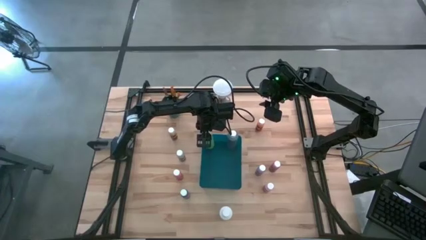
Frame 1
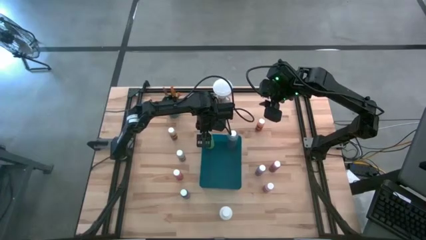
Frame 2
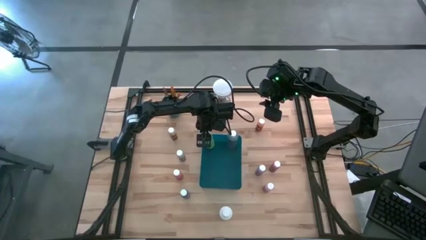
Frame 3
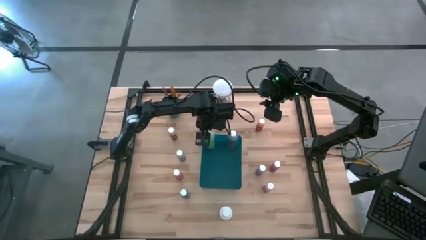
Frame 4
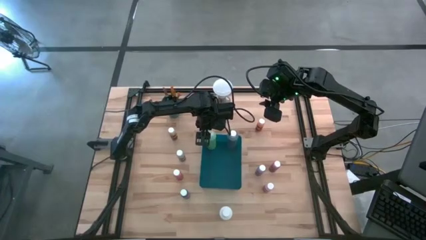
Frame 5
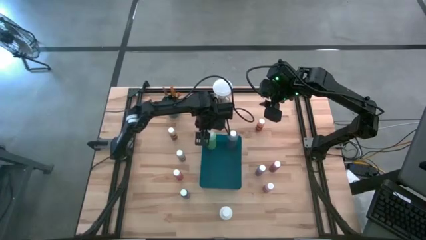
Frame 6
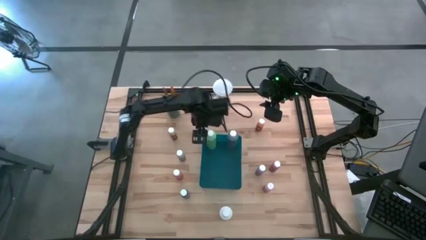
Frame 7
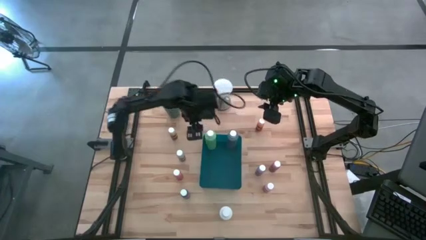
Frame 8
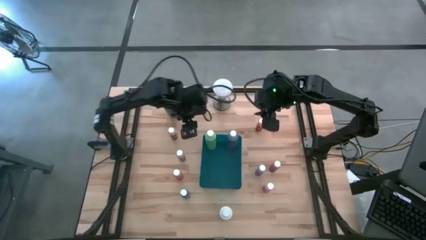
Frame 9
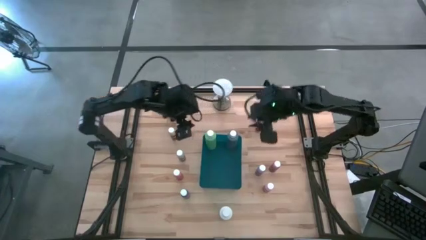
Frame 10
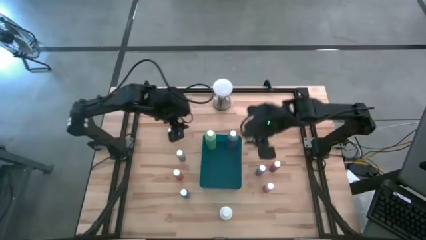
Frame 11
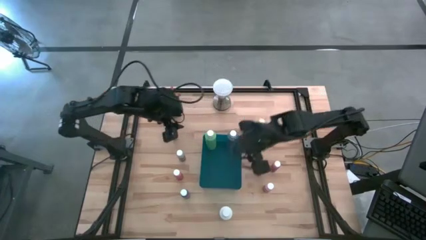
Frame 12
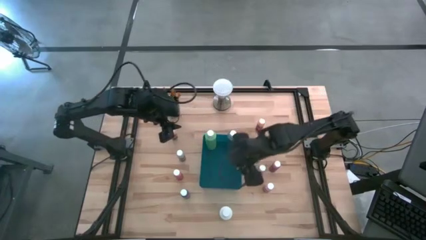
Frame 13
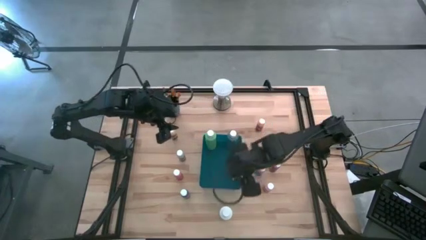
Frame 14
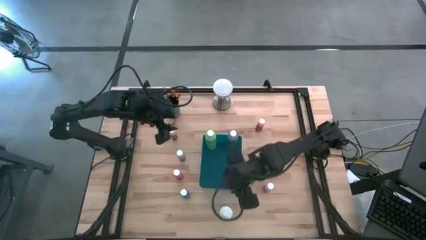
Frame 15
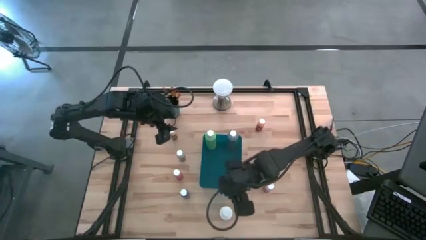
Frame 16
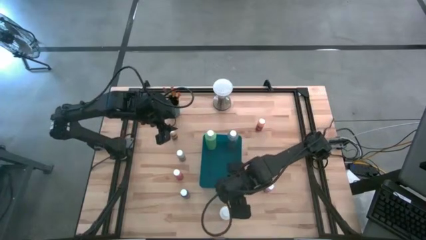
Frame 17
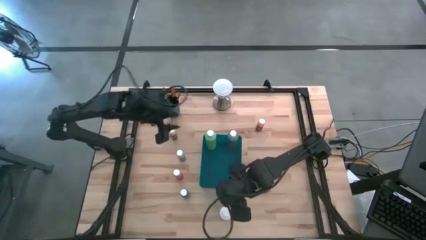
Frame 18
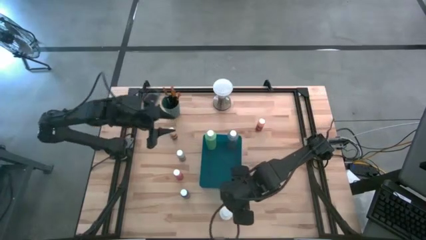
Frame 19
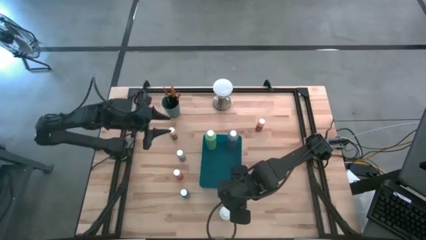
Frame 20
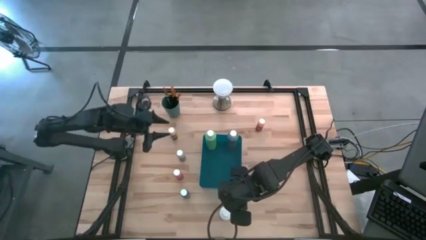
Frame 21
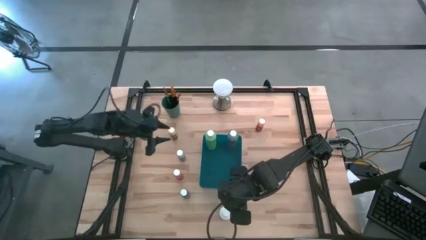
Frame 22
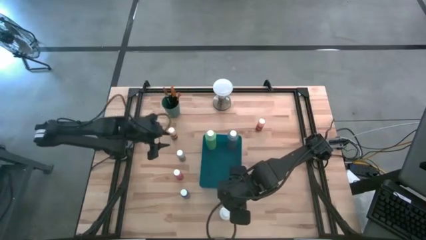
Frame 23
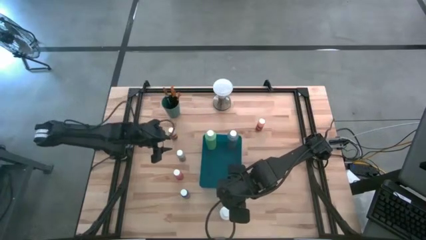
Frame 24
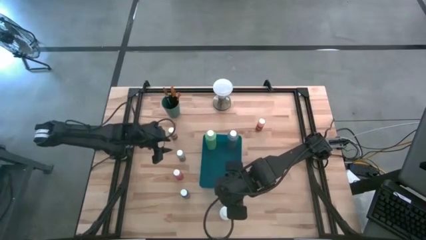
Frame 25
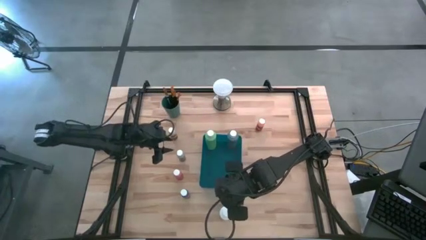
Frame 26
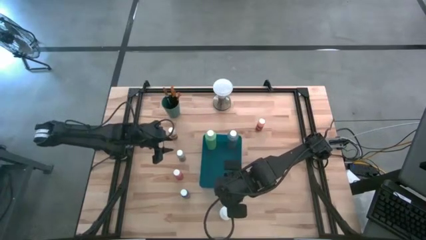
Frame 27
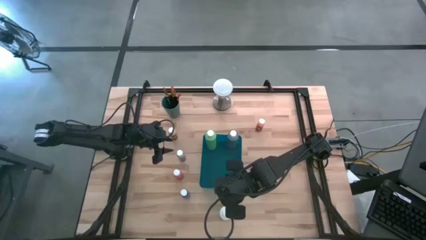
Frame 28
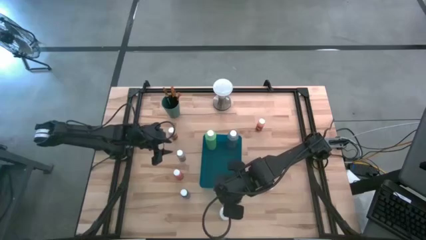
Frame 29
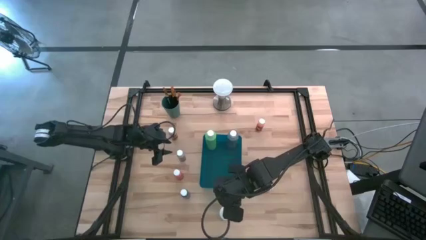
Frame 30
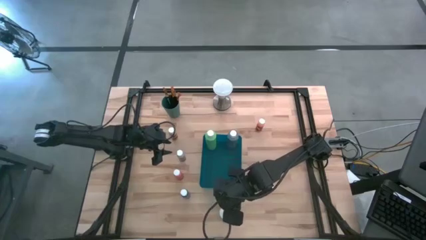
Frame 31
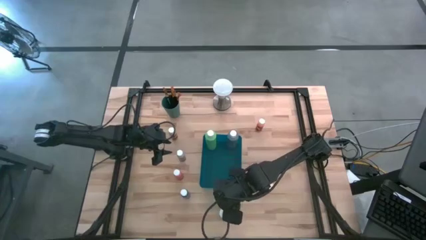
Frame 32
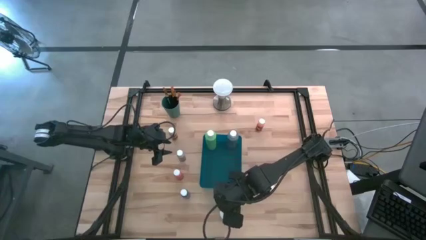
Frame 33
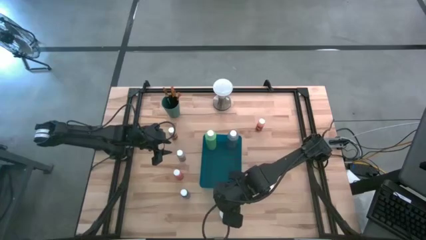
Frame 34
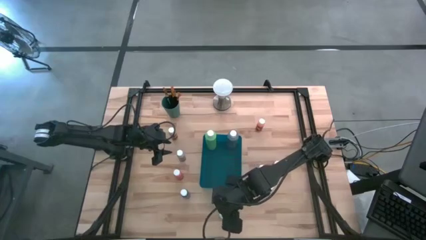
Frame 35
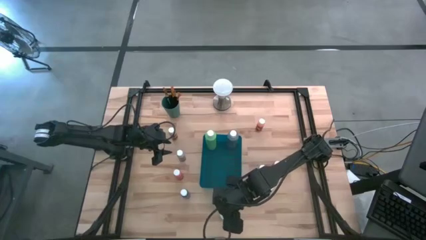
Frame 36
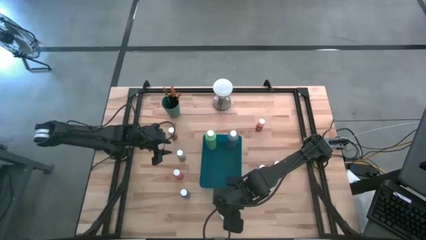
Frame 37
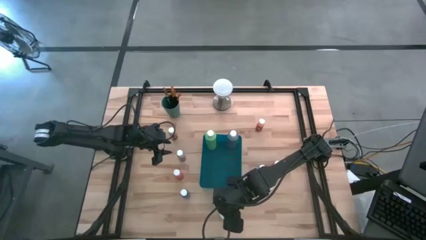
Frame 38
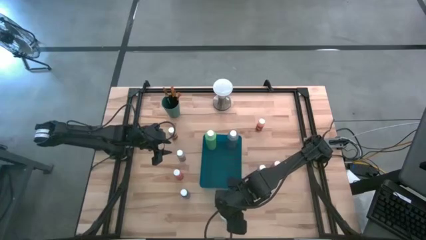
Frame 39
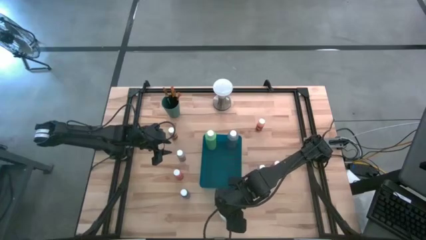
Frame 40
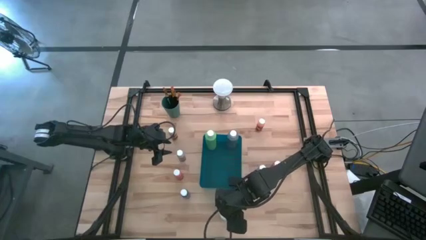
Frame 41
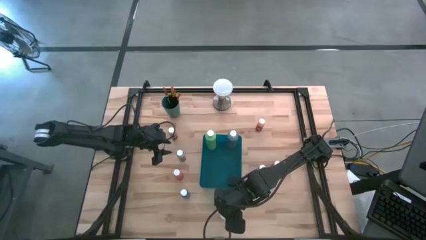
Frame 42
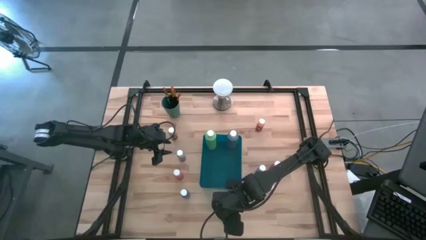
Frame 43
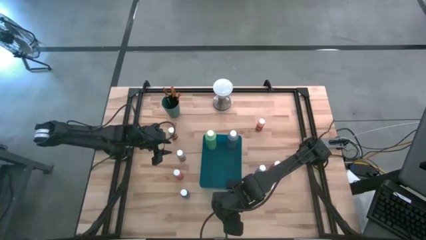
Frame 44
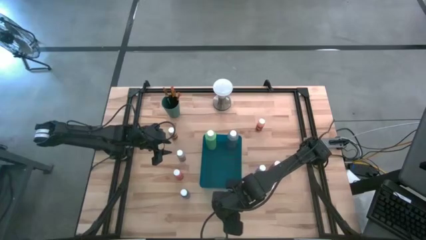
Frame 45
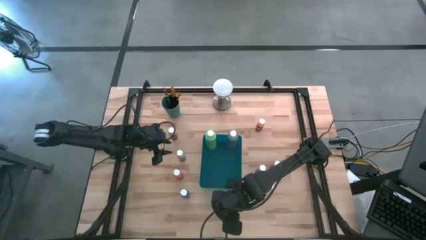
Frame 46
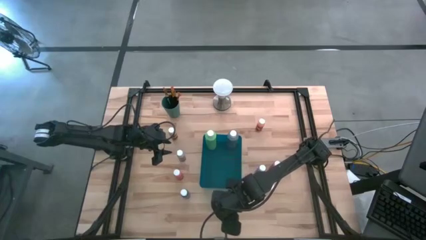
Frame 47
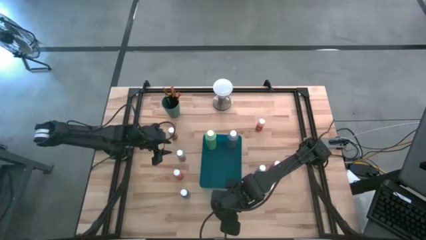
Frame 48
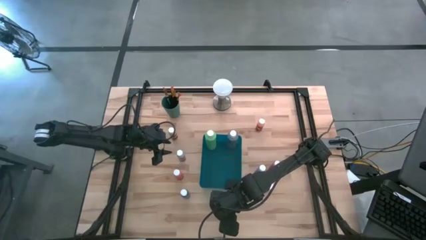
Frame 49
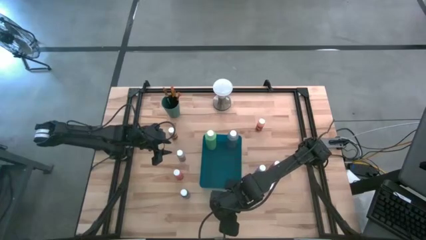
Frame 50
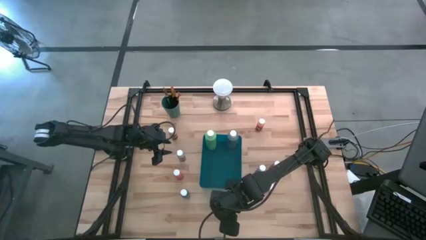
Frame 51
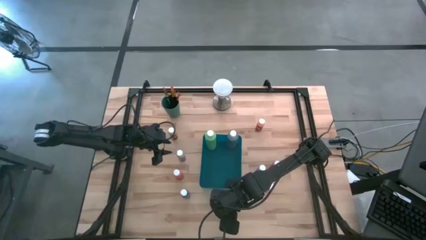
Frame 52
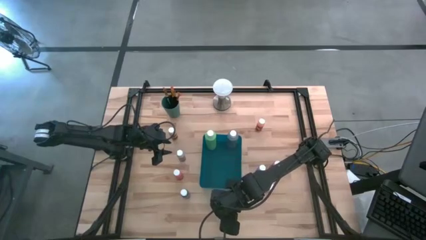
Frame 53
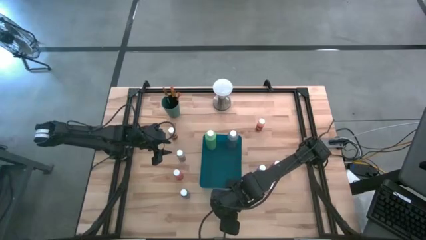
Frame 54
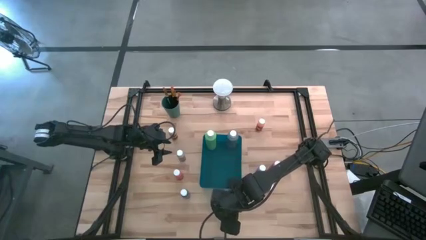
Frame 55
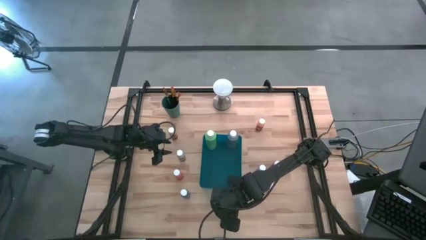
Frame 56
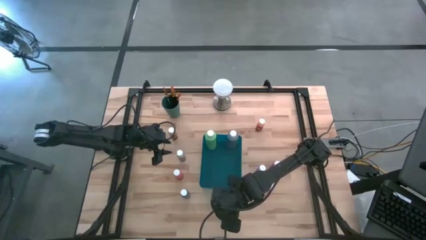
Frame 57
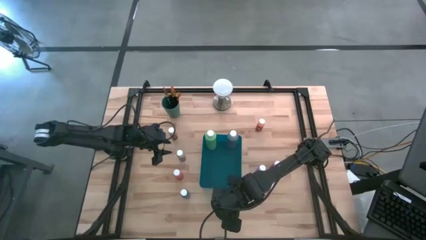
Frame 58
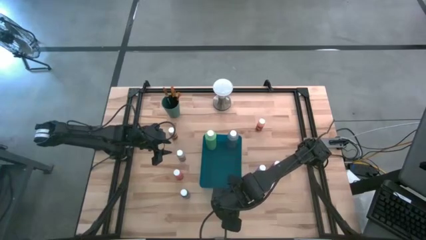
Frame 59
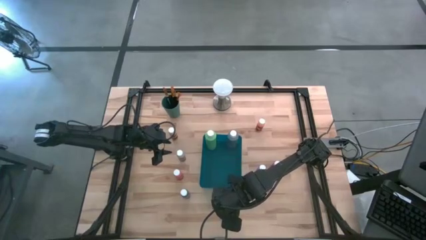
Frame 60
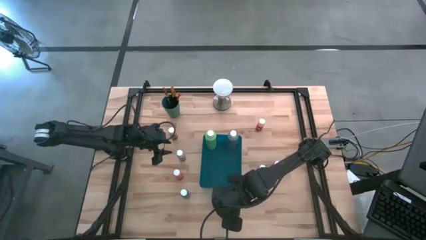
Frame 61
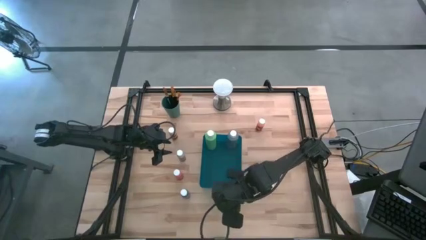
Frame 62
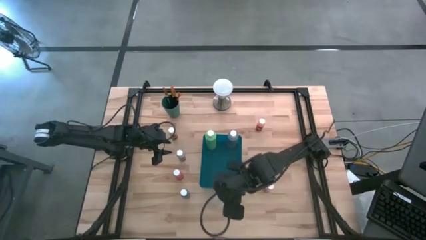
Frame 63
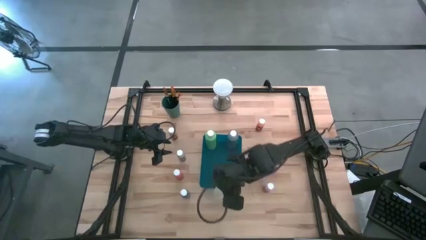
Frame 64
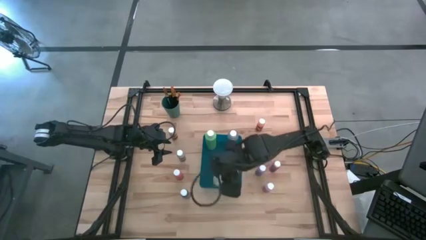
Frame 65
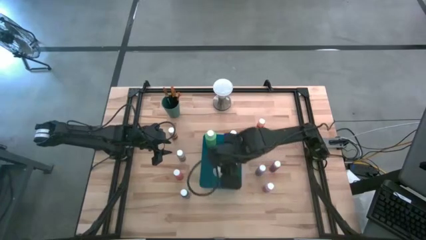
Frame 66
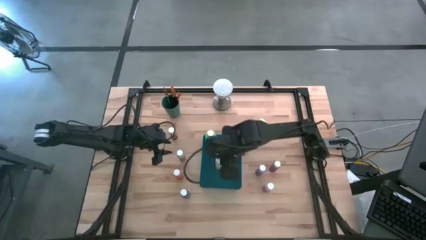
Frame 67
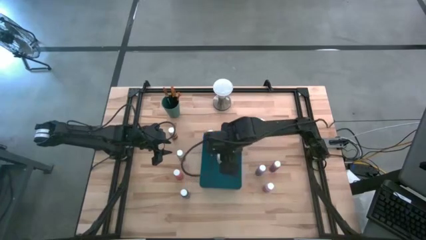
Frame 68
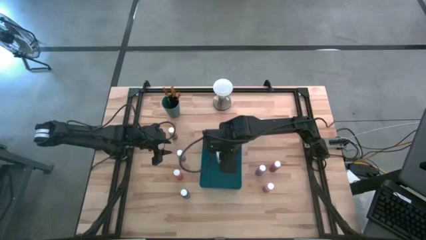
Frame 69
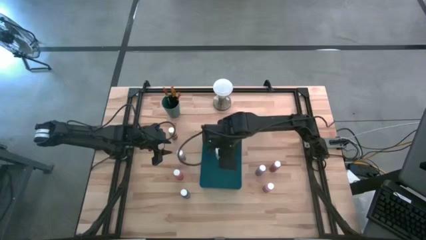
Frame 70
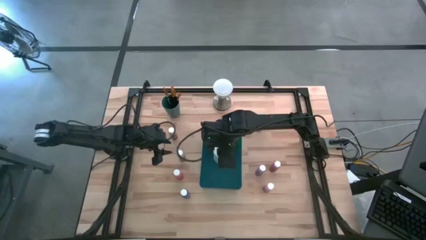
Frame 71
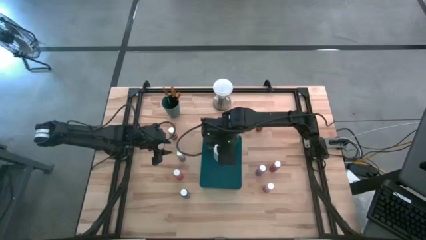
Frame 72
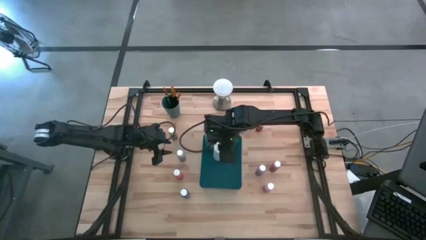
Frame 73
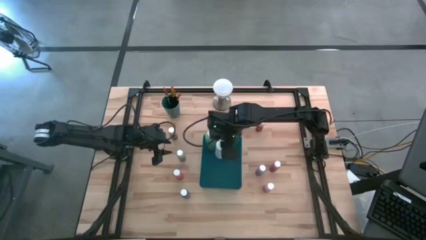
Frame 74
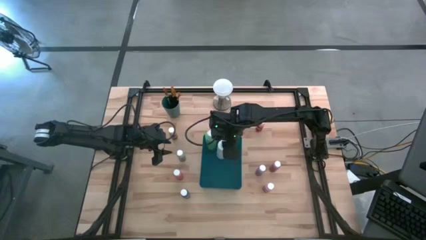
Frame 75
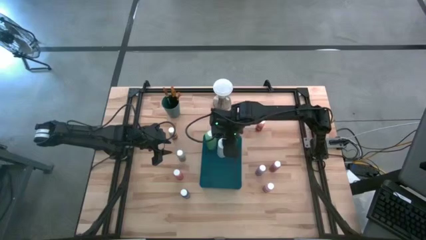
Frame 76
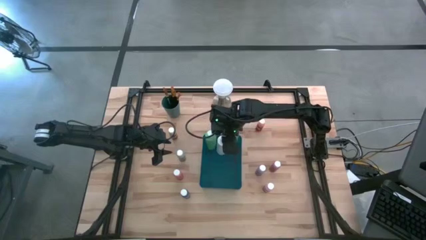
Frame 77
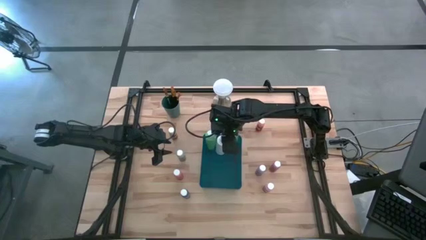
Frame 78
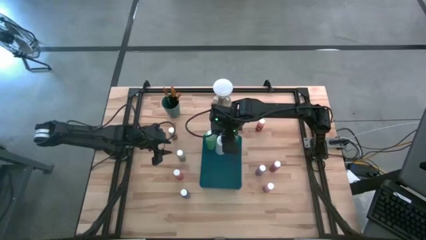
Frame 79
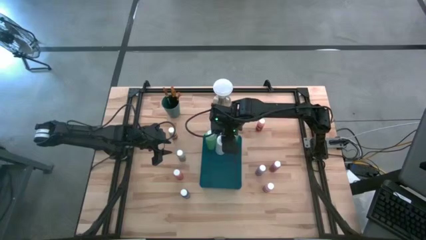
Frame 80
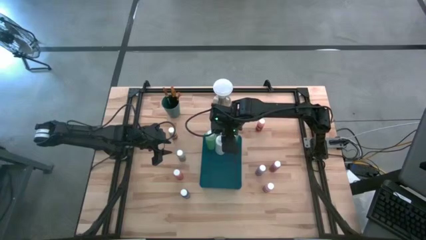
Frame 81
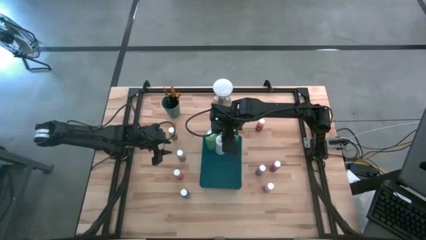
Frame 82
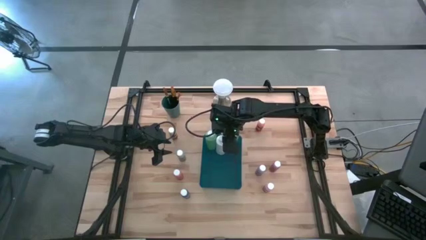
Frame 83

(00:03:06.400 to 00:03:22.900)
Task: Pick & Place Paint Supplies
Put the white paint bottle into the blue bin
